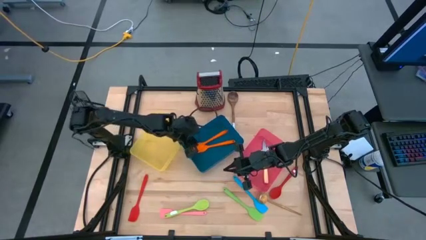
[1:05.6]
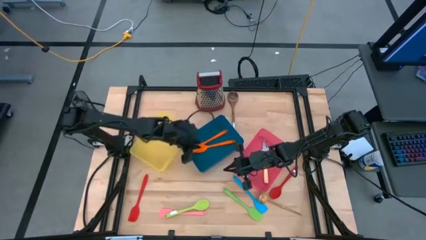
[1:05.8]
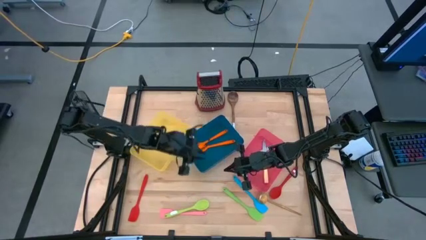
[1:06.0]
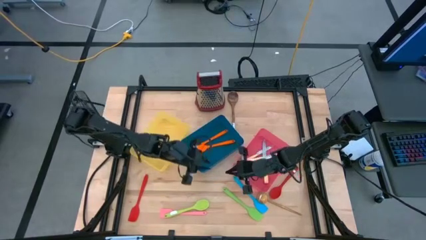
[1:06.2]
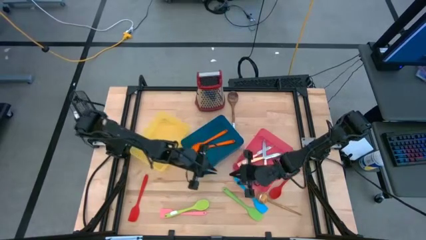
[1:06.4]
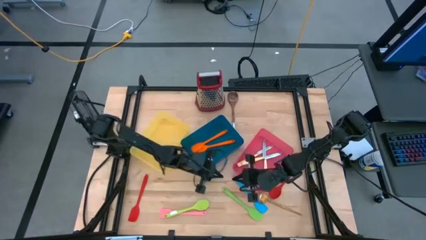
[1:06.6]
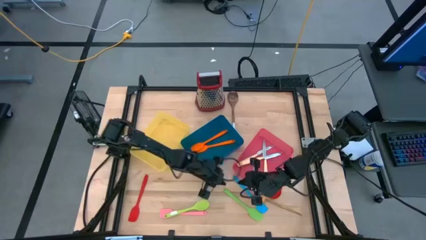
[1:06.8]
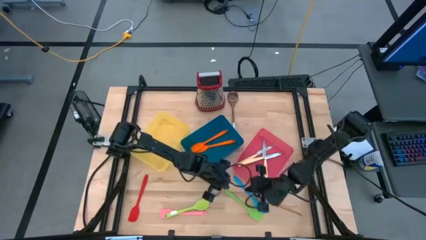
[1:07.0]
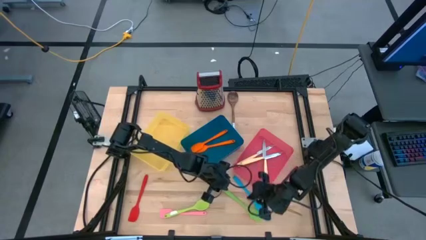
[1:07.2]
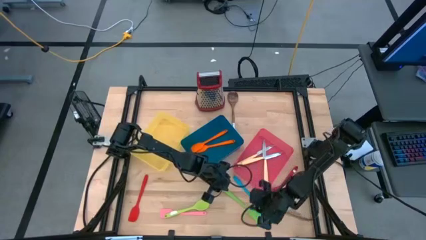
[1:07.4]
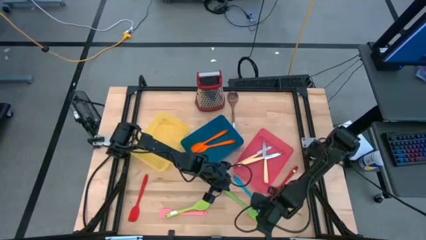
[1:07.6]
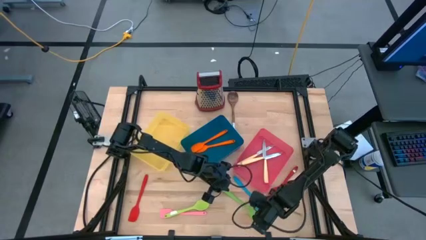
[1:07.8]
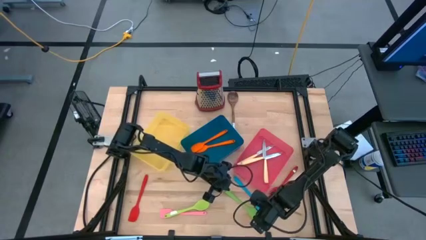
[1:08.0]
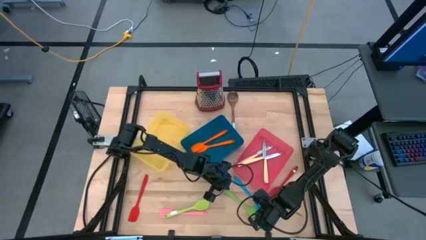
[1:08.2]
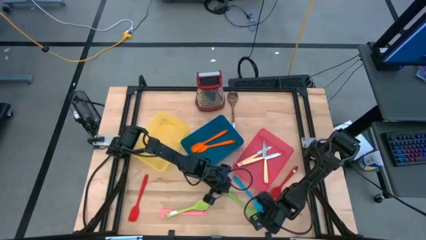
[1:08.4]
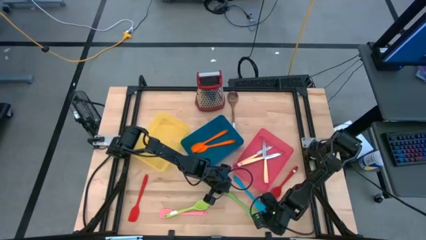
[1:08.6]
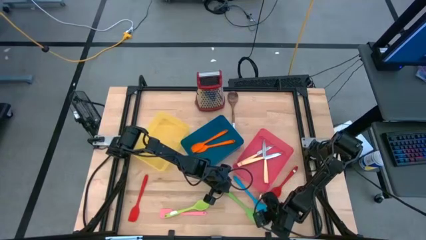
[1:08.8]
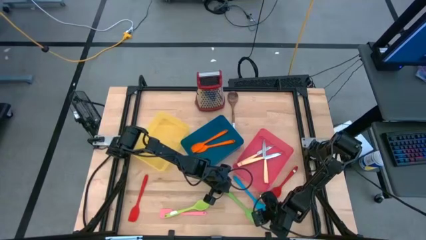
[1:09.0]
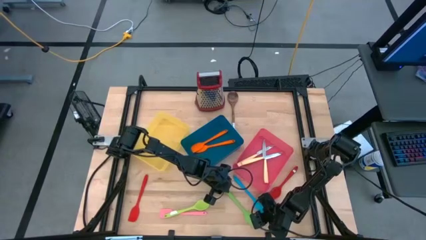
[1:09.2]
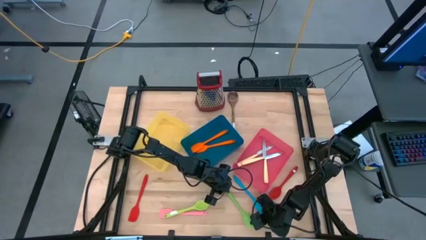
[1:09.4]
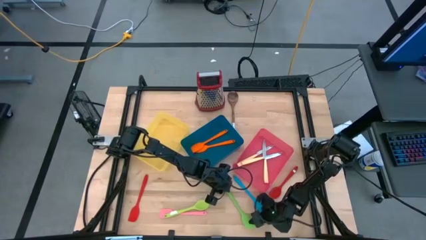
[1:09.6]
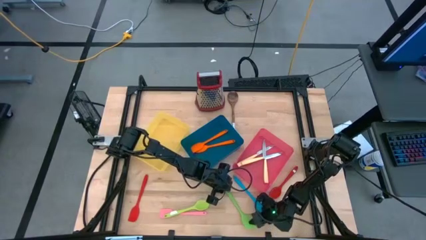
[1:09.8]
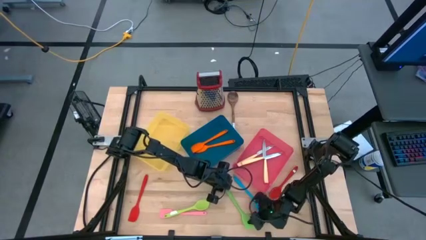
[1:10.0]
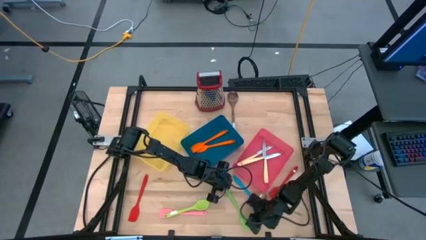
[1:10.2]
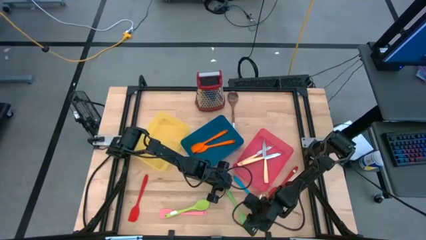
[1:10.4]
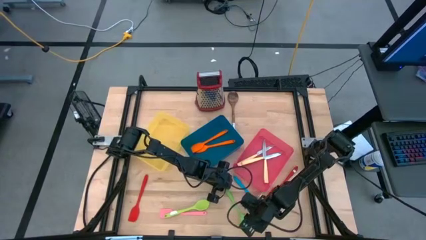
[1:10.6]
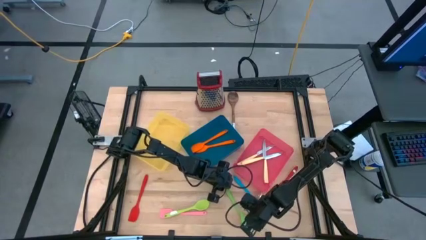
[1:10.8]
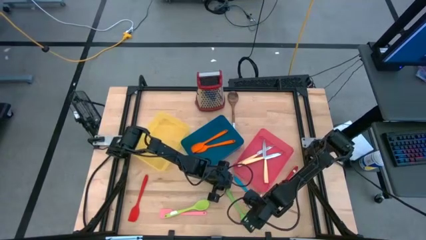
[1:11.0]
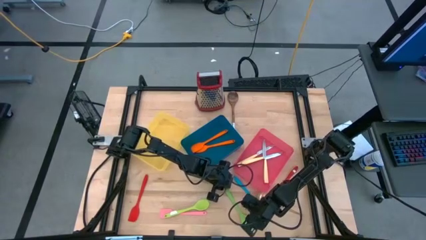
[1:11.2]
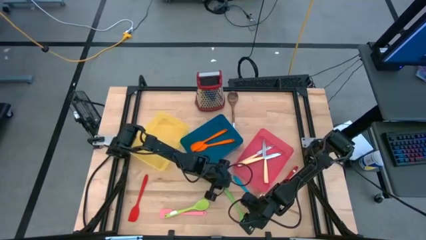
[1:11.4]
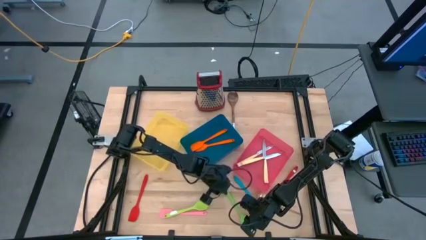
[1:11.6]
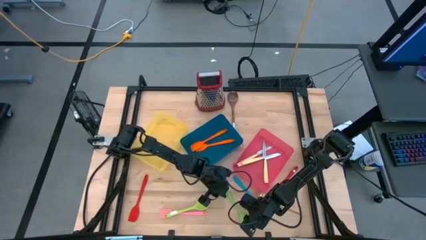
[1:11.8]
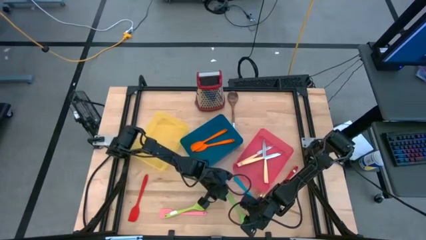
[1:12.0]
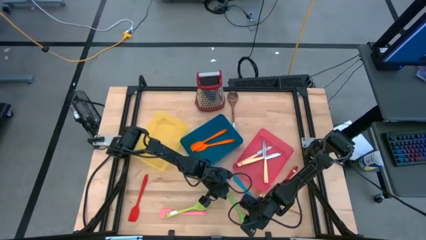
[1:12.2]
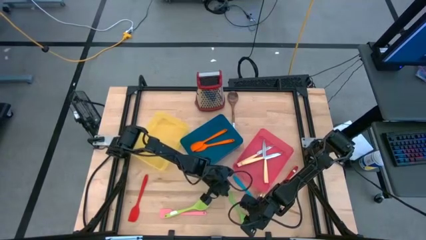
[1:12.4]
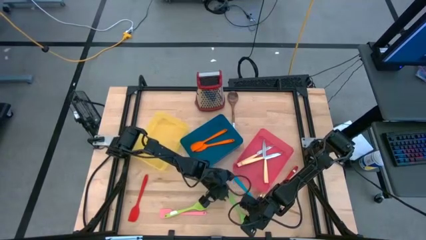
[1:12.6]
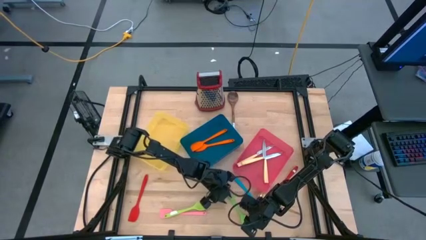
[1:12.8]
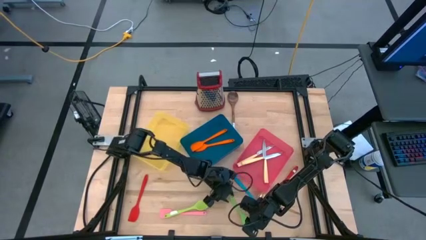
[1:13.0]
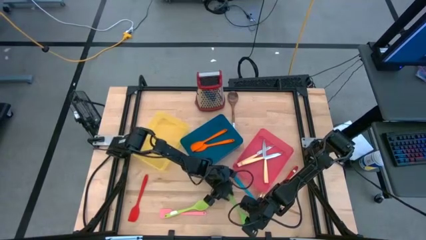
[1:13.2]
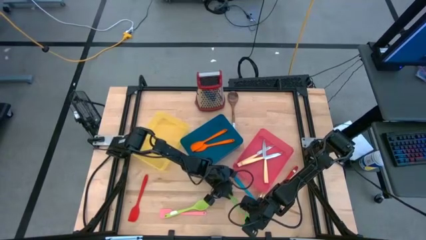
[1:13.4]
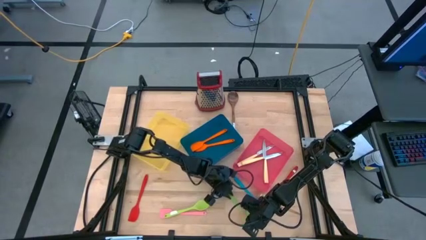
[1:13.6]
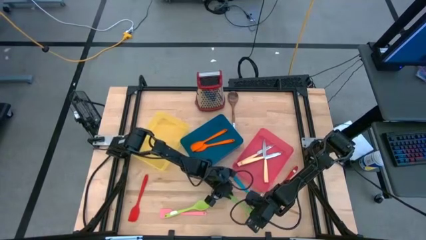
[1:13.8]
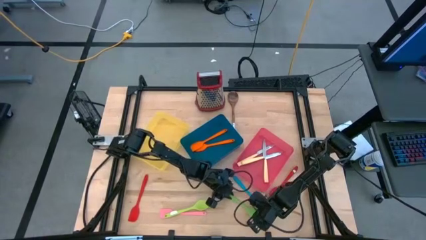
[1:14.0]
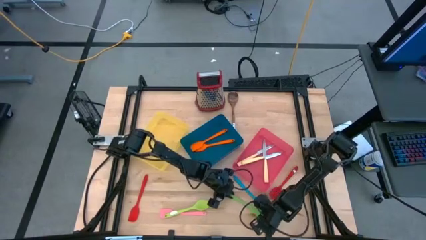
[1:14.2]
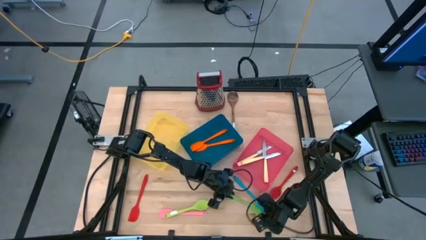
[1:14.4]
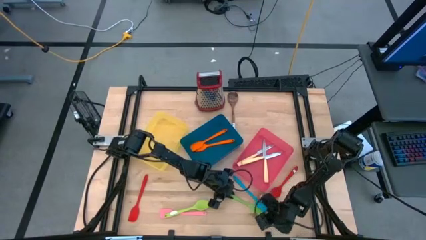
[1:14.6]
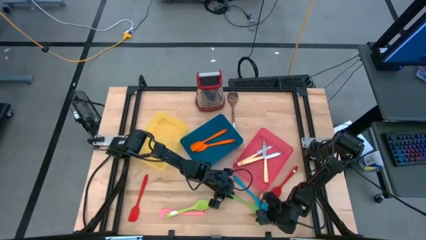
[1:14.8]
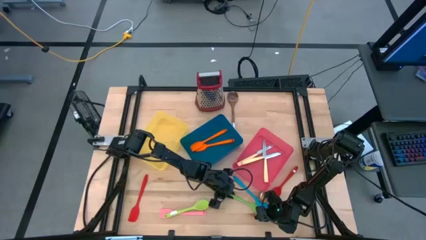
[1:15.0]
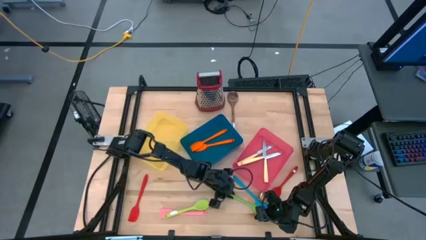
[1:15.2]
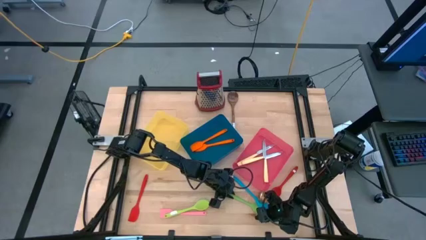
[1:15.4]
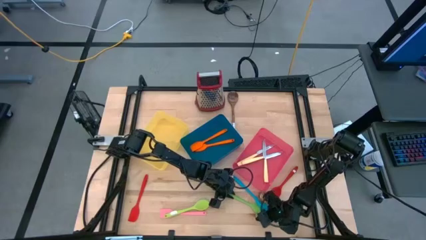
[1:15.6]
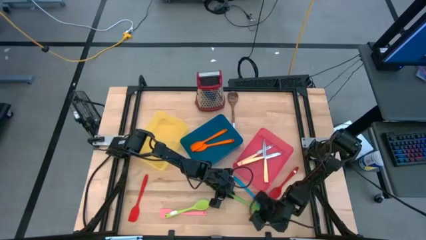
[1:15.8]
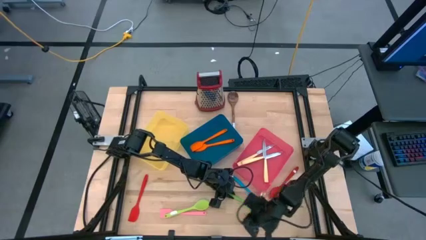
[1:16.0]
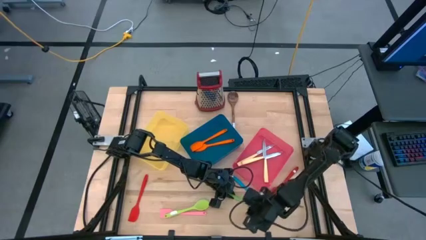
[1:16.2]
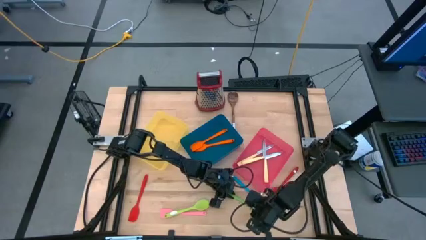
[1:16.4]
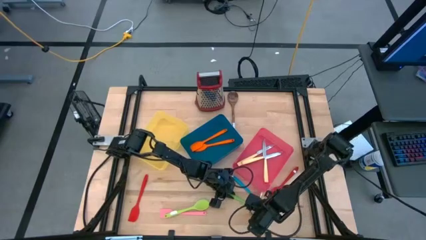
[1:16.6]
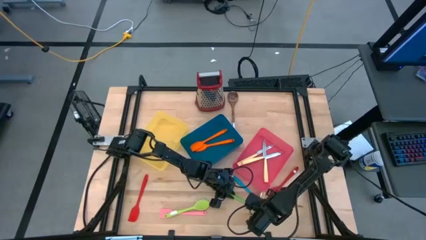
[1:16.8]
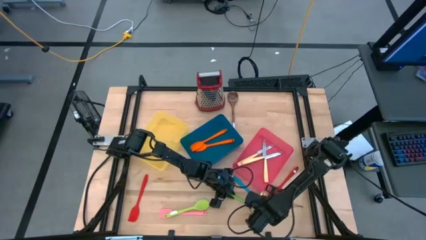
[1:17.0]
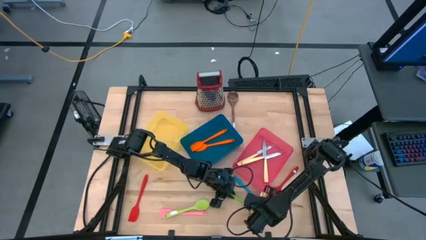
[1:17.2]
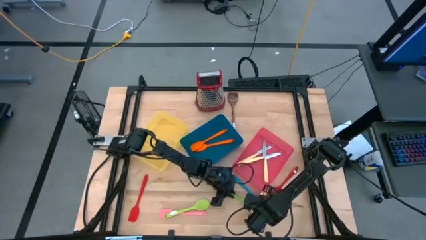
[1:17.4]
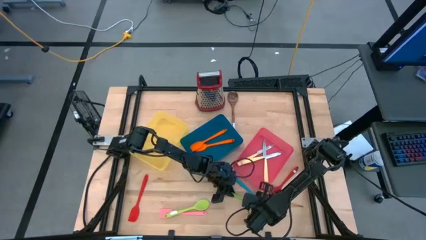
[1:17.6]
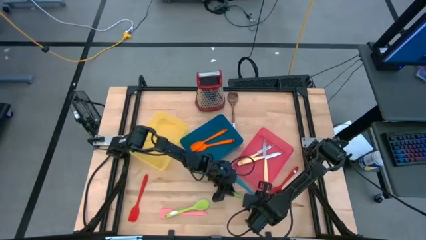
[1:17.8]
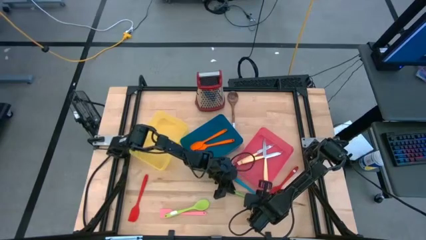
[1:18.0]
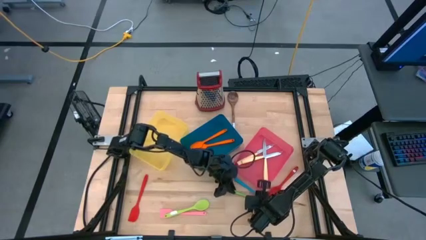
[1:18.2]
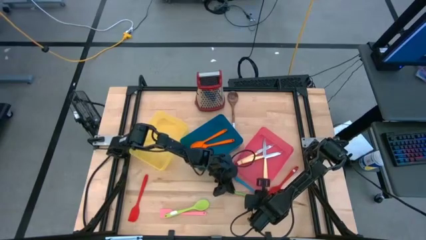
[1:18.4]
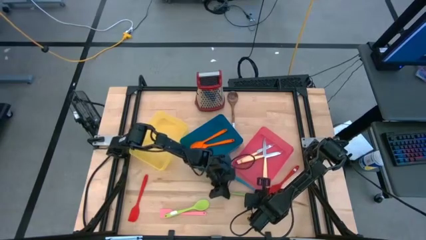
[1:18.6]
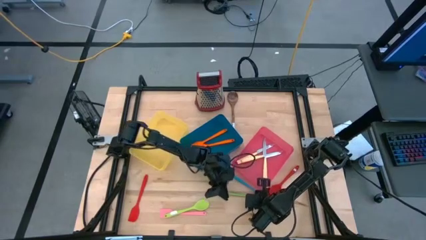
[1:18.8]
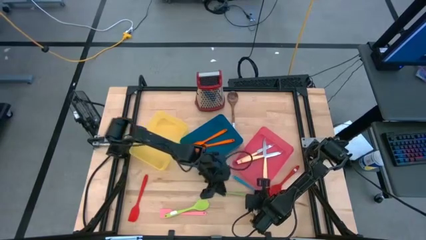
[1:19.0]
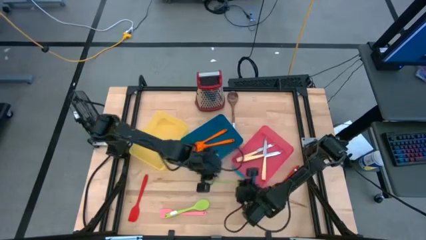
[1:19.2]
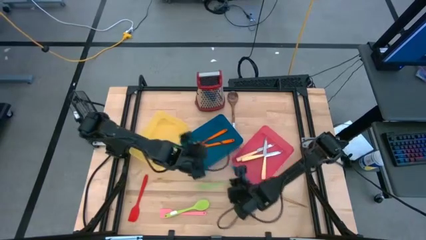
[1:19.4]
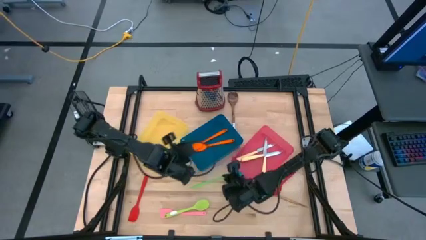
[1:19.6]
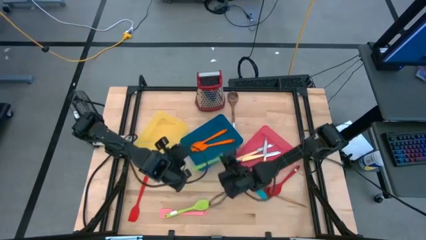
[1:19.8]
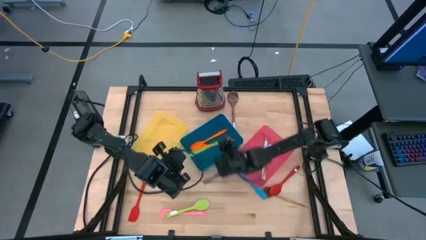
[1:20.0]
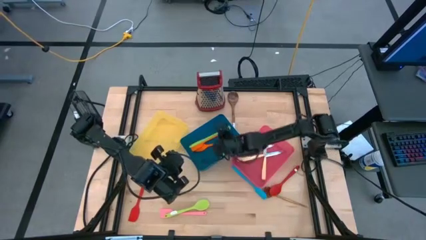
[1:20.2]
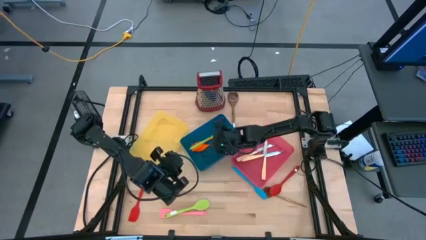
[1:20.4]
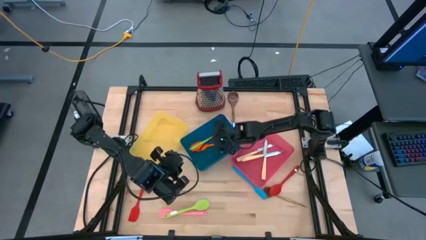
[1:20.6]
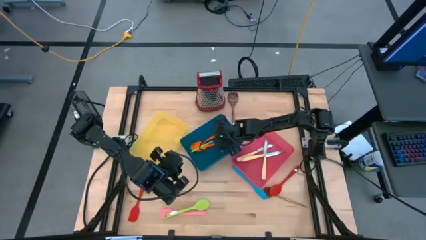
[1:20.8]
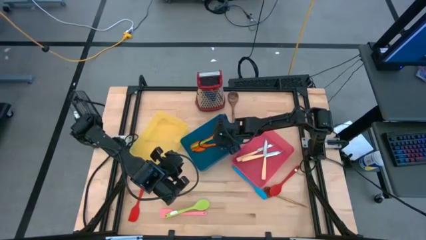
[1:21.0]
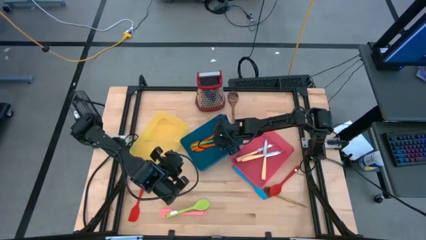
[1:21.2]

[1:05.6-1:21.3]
Task: Pick & Place Kitchen Items
Put the green spatula into the blue bin
